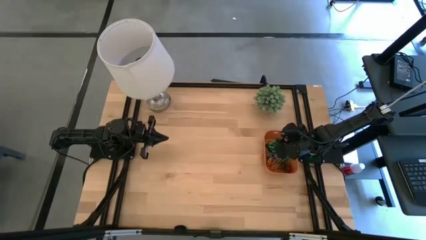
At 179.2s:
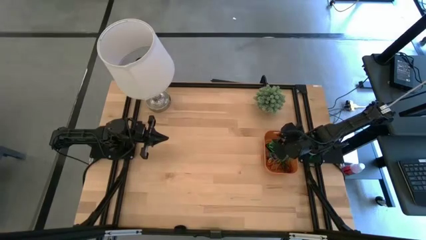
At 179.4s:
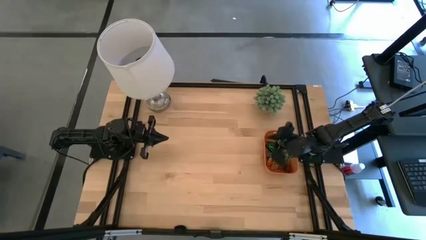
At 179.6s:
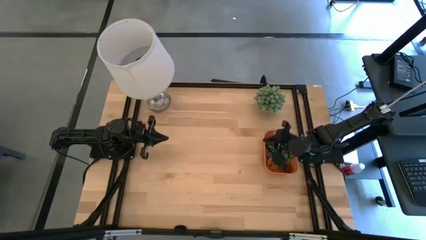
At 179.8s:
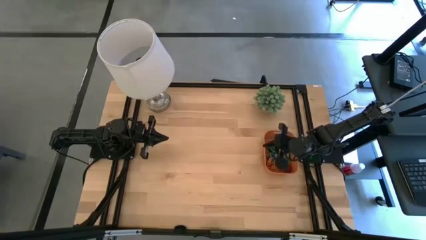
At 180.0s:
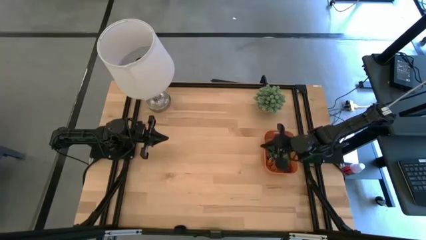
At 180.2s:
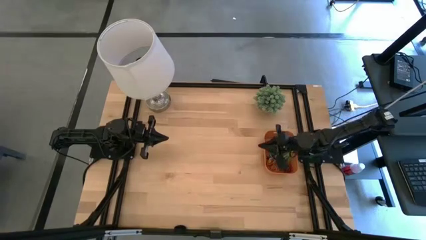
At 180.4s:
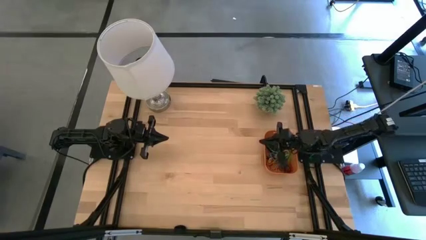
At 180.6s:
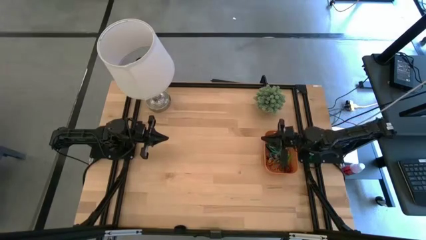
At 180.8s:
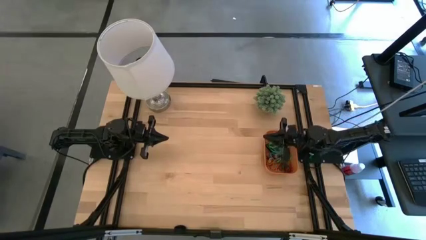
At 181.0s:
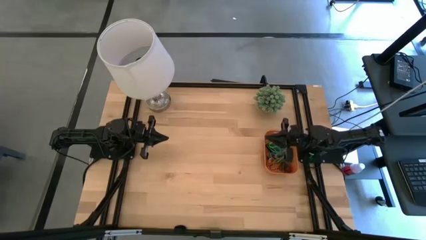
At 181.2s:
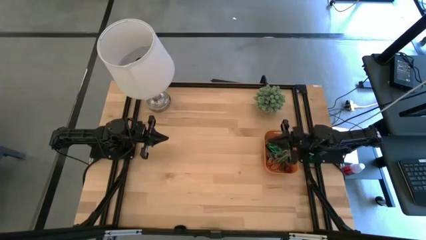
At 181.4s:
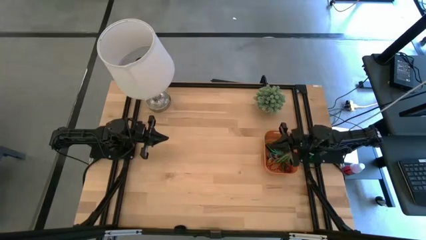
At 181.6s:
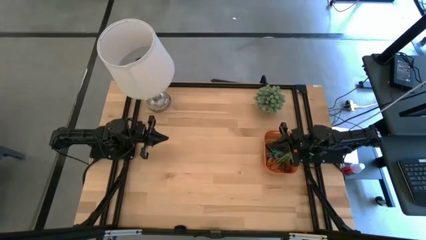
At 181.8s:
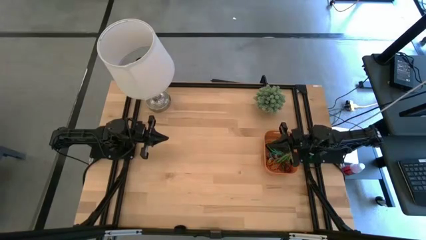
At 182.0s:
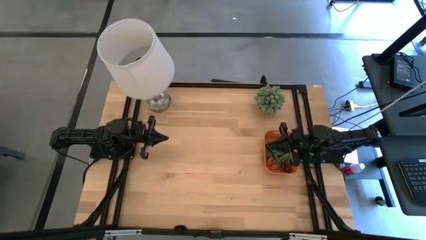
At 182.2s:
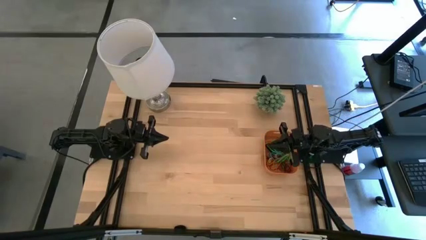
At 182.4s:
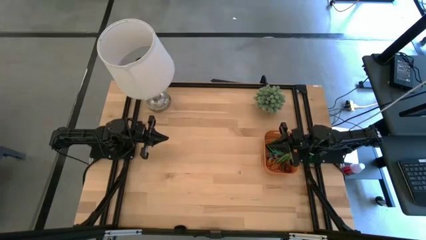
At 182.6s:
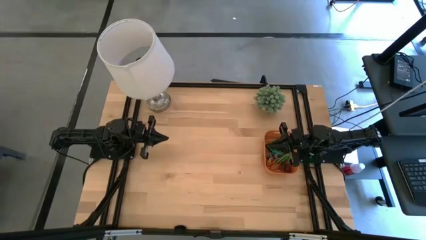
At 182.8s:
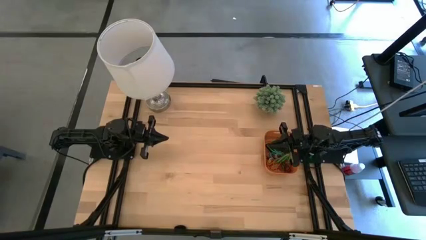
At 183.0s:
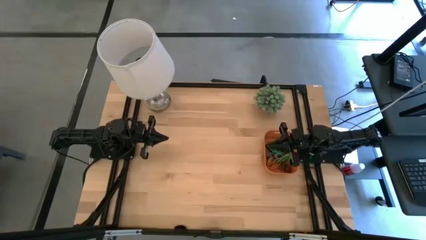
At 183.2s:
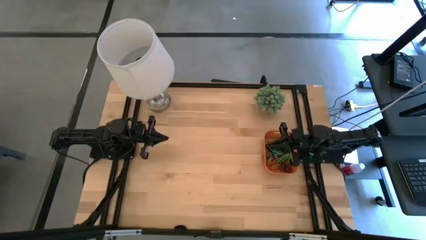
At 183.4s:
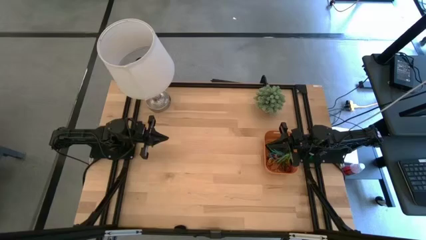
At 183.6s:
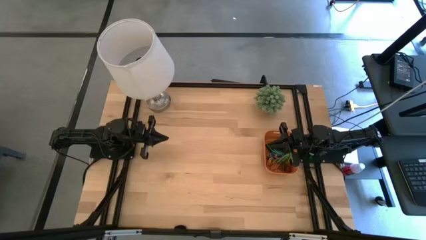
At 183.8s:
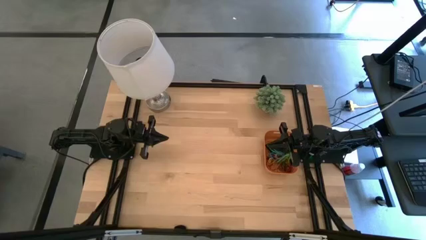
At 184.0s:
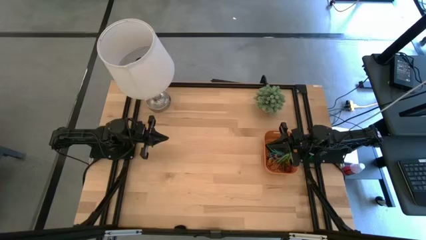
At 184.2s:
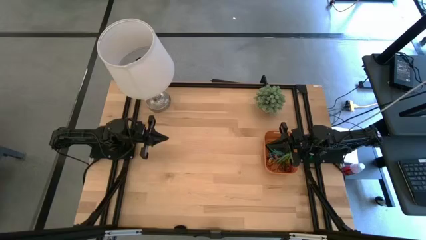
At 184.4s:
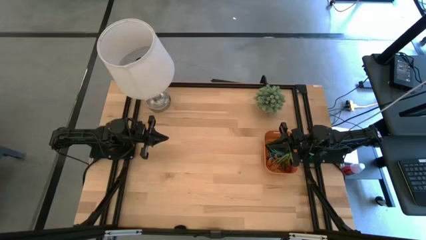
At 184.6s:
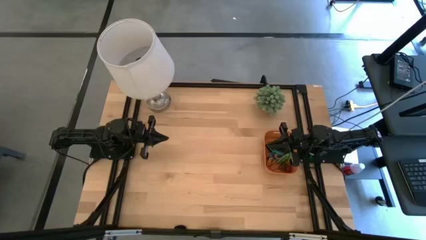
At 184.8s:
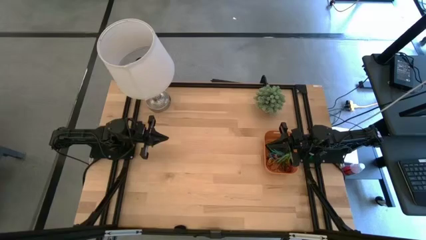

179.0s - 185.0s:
Task: Pick and place rubber bands into bin
Return to Home Position

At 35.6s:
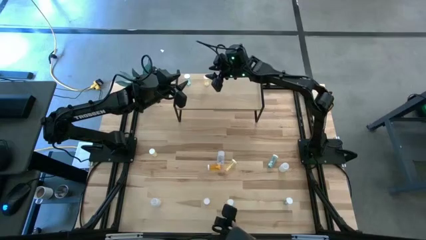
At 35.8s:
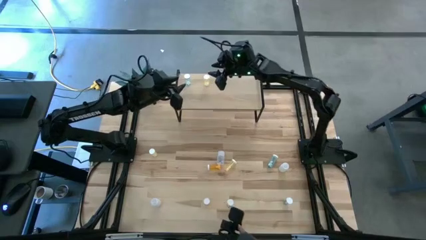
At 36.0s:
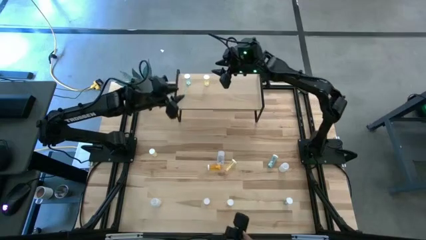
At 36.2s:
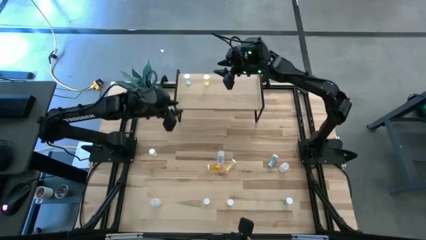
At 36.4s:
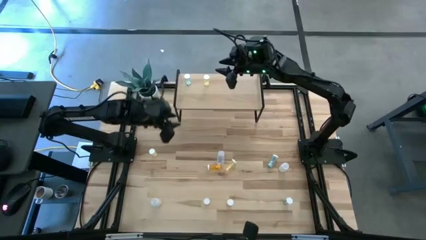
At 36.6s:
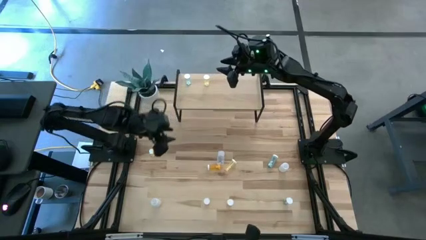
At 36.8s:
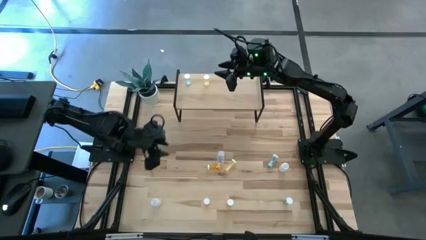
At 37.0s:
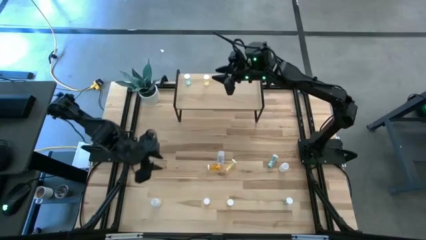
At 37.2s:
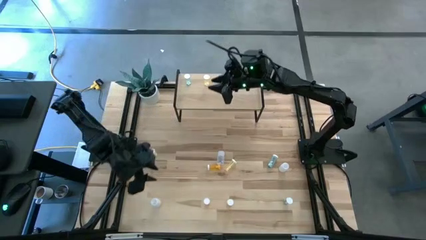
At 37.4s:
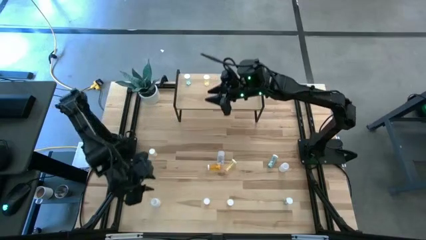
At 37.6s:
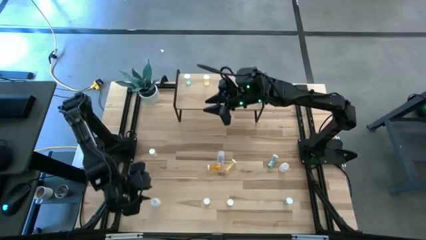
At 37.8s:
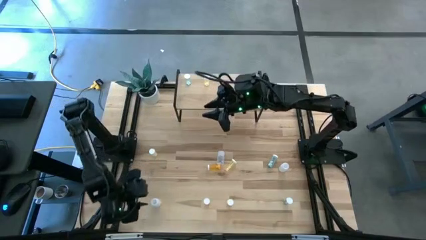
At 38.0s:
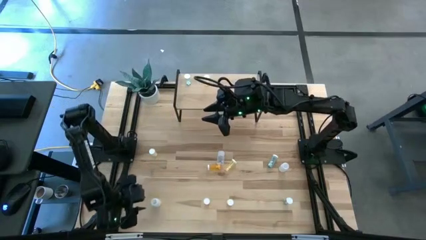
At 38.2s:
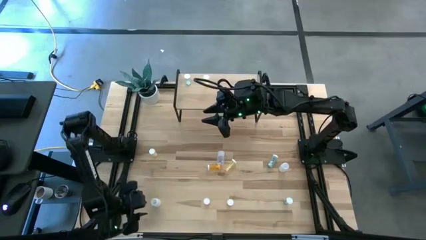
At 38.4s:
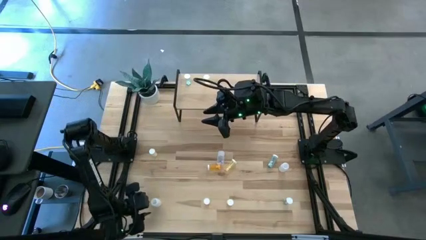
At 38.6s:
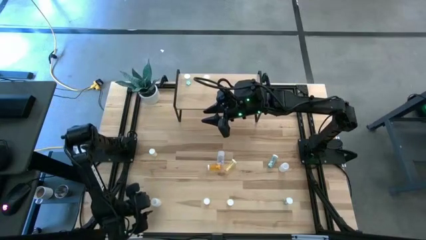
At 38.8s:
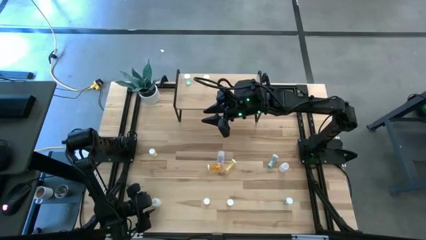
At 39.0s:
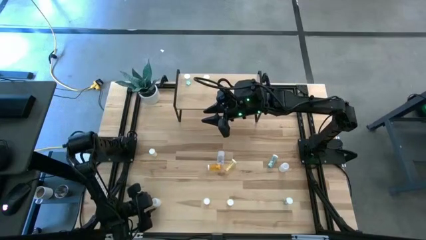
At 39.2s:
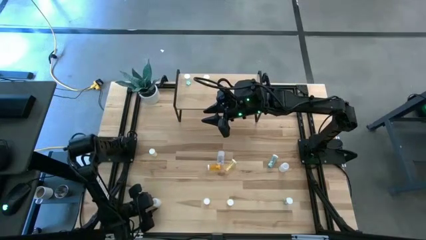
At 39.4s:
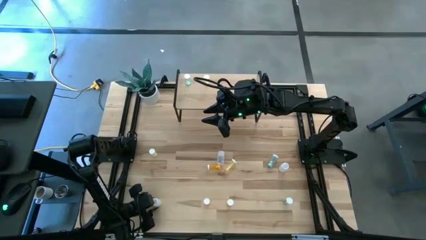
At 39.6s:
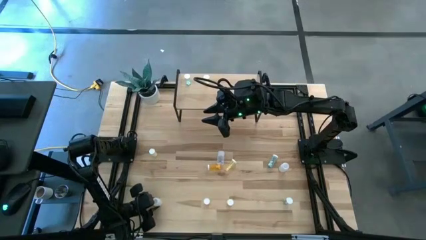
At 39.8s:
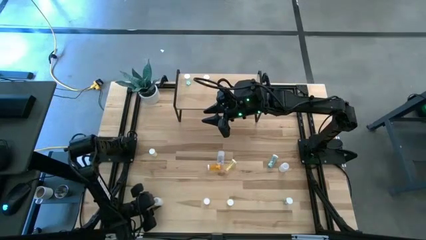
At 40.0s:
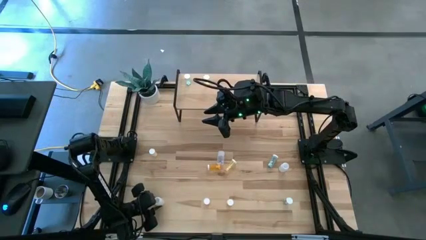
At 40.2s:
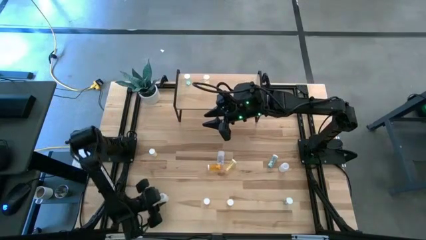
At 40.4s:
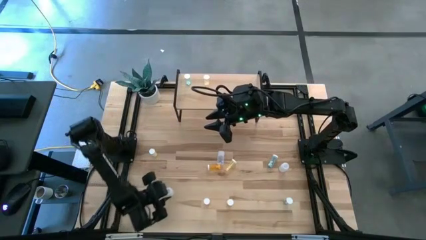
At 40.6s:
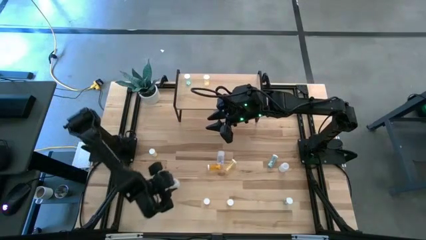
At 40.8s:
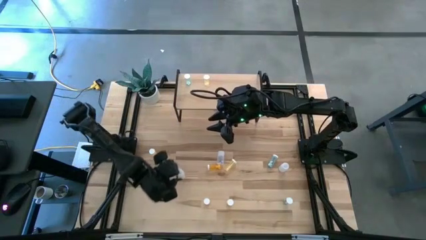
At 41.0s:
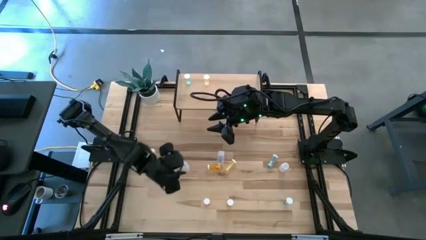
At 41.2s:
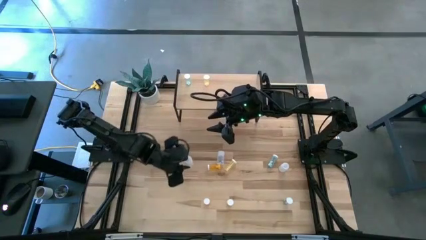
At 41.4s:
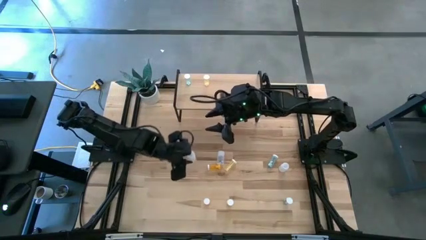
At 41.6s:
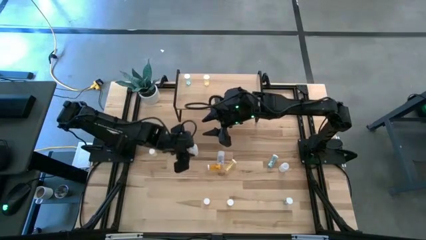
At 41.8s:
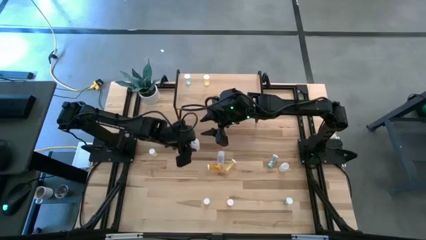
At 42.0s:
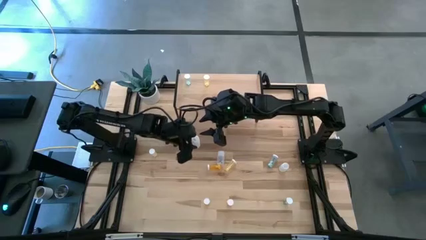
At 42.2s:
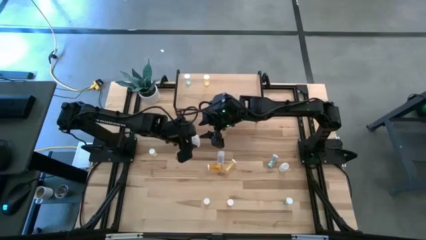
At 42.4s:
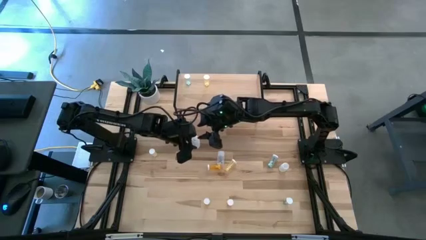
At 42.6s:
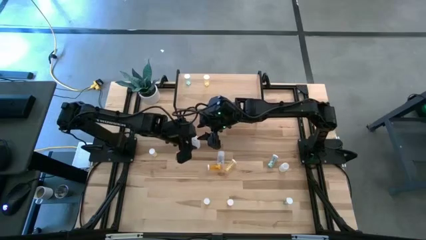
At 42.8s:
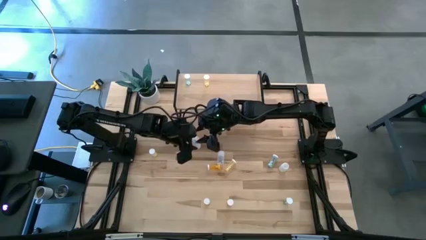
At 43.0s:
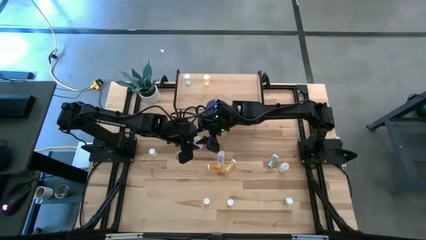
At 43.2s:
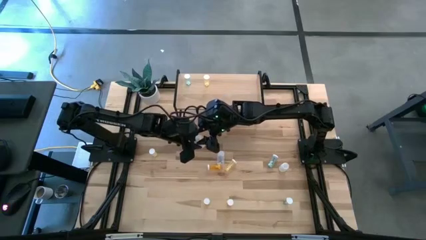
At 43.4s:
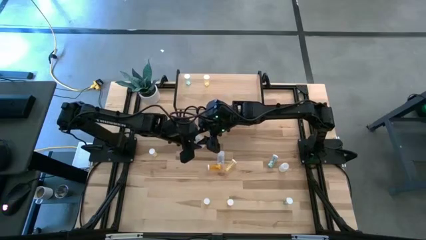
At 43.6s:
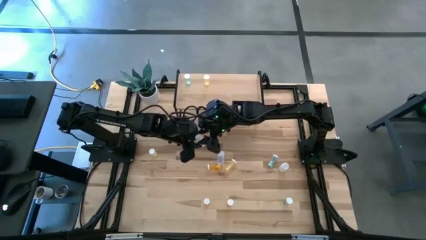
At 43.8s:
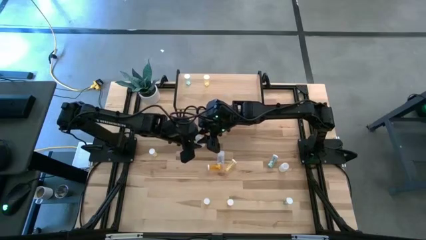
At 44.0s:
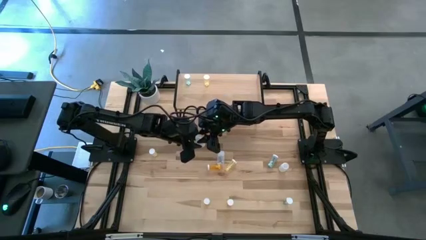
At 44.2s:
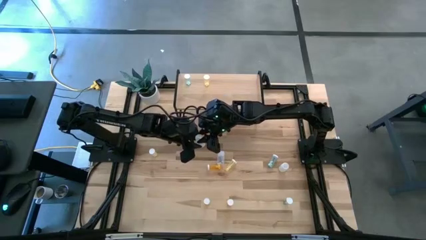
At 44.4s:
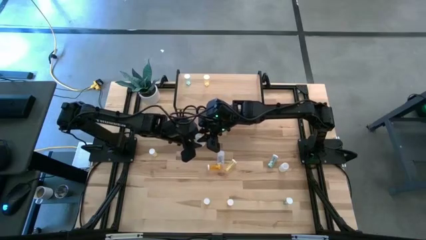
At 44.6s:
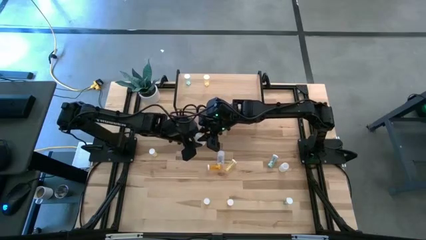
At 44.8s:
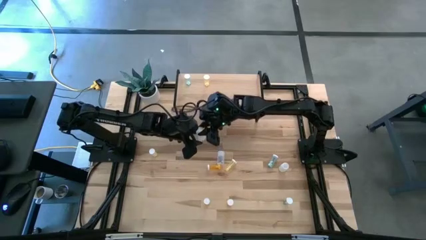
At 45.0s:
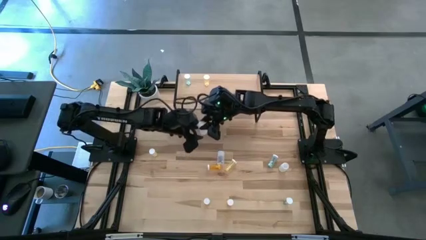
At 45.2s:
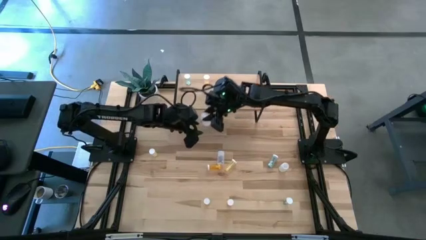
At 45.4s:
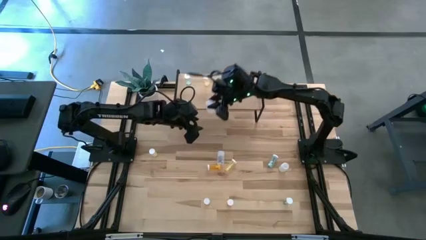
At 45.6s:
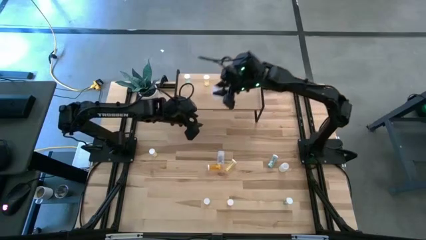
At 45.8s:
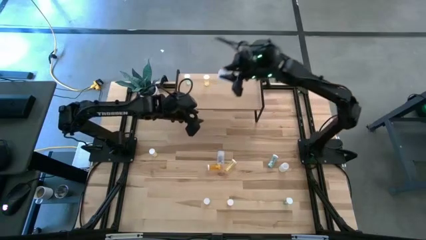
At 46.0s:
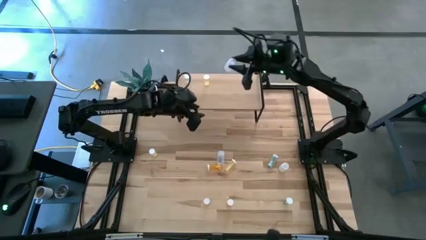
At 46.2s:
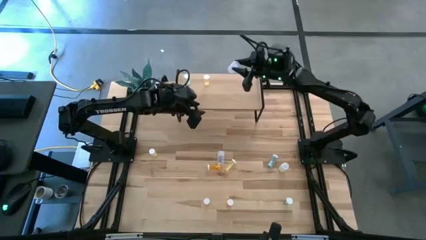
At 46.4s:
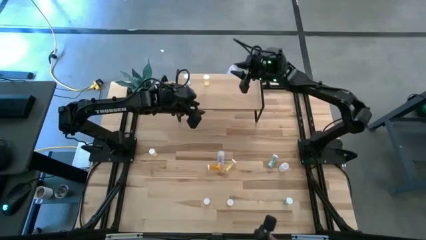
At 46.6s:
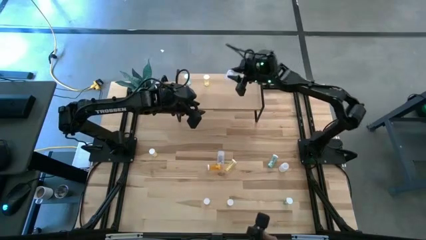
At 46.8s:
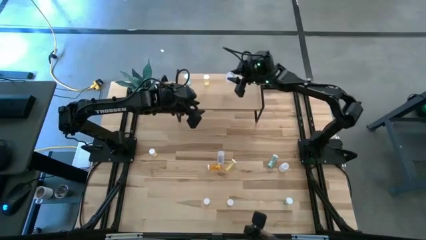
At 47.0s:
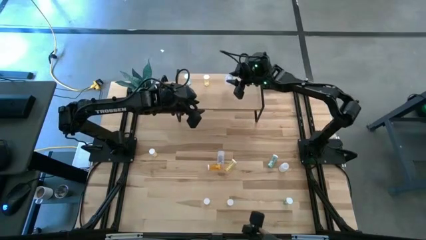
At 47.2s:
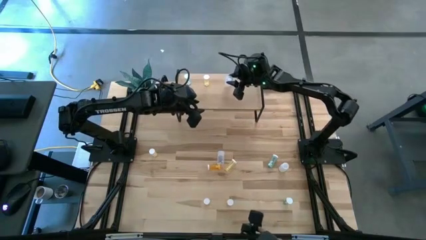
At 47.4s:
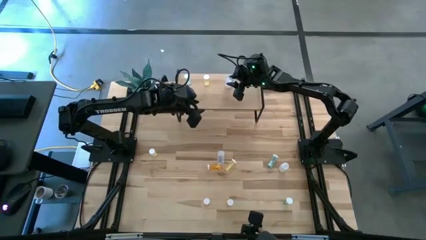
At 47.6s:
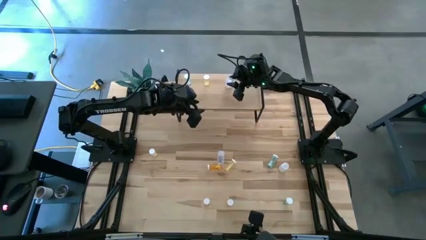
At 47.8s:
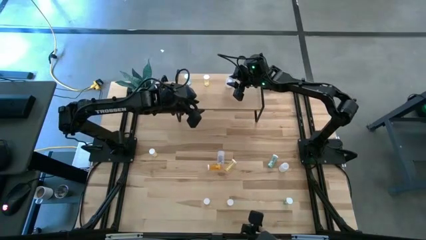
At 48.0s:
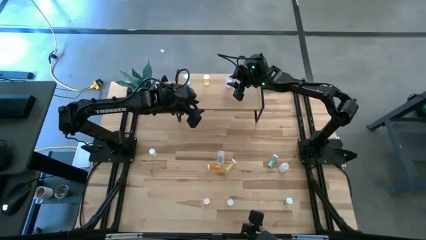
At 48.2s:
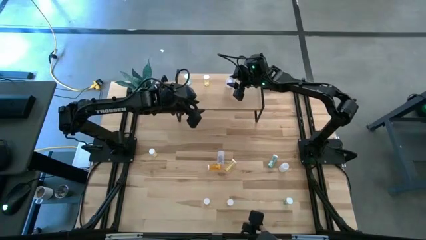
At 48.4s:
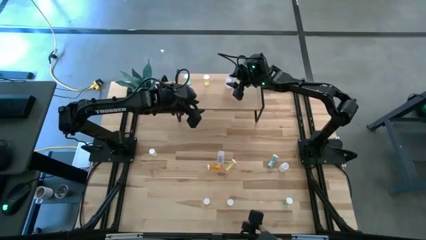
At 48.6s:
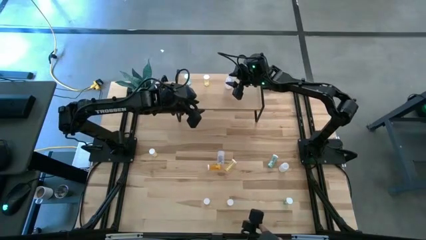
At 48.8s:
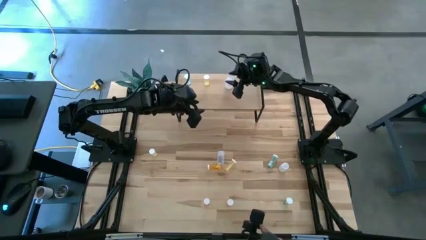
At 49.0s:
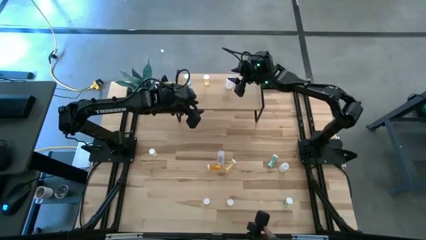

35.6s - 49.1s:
Task: Pick and place medicine bottles onto shelf by color
Put the bottom left white pill bottle on the shelf
